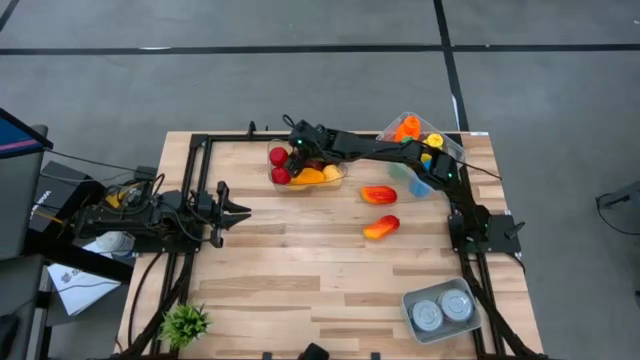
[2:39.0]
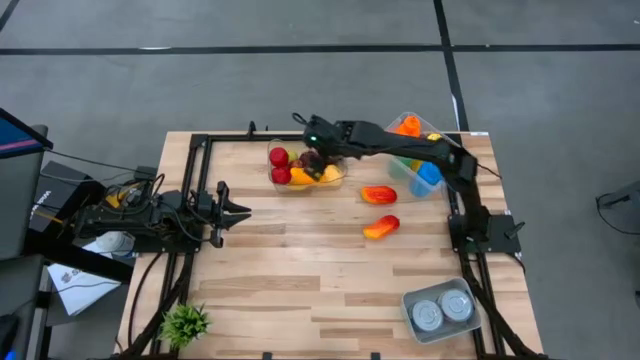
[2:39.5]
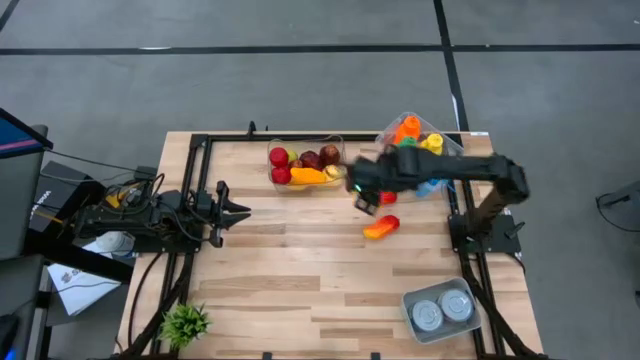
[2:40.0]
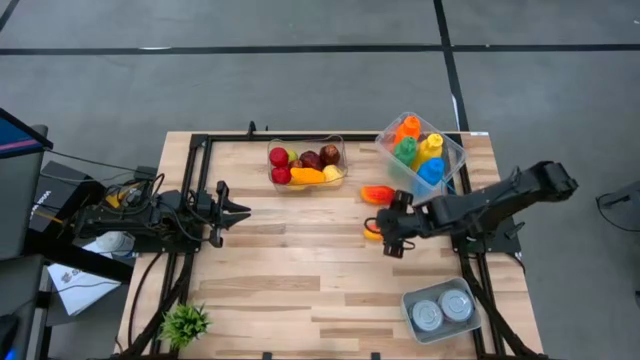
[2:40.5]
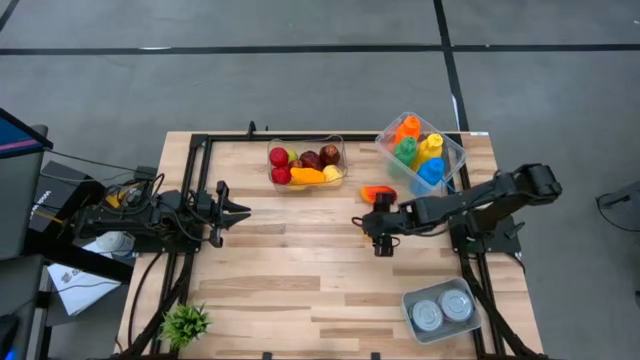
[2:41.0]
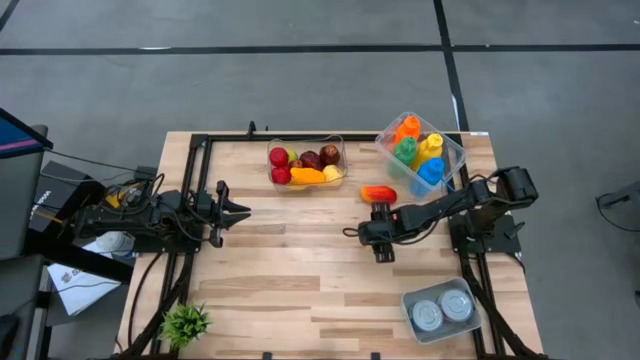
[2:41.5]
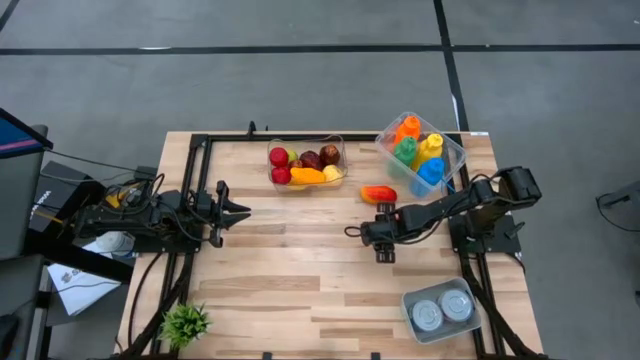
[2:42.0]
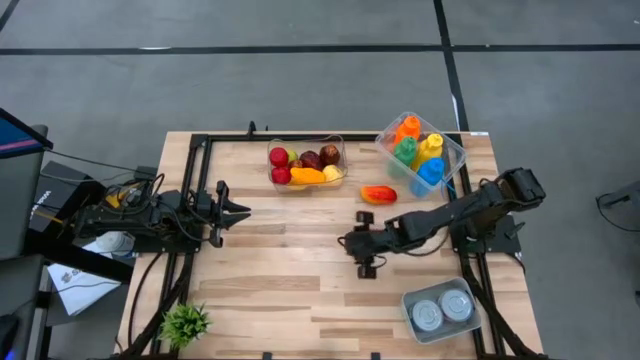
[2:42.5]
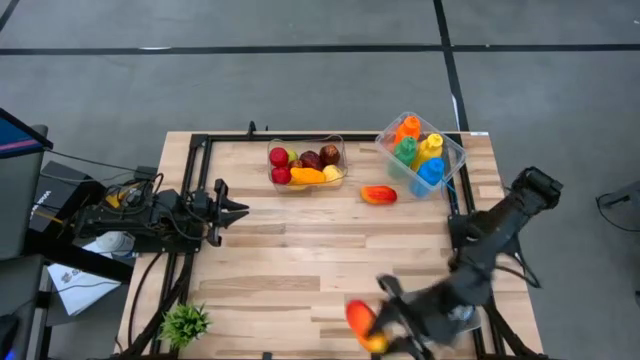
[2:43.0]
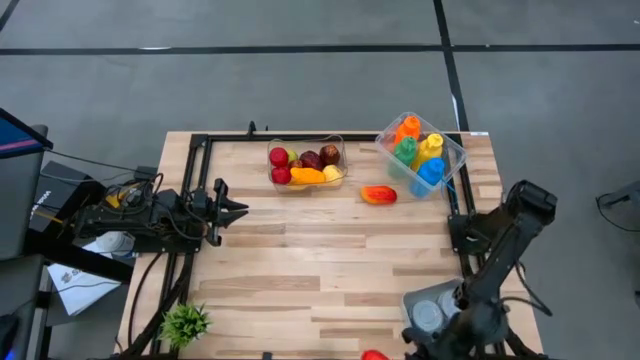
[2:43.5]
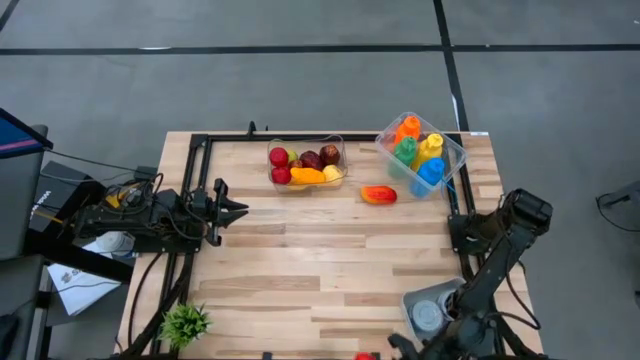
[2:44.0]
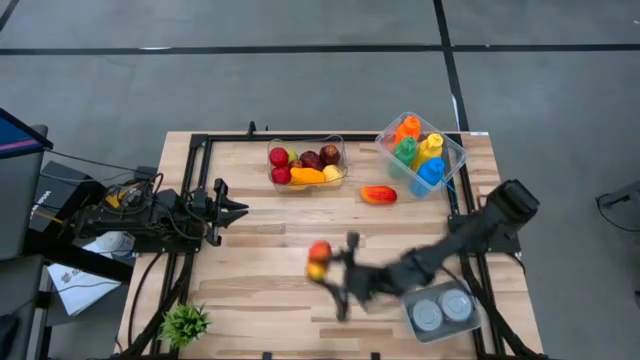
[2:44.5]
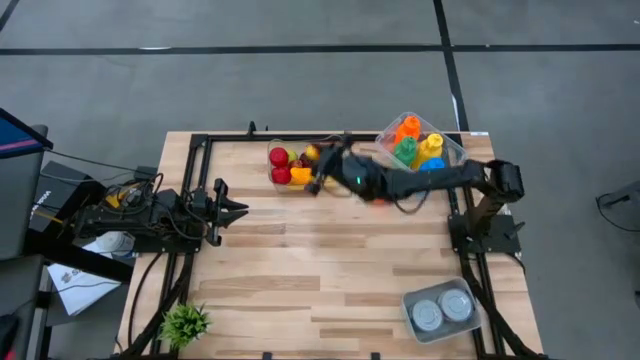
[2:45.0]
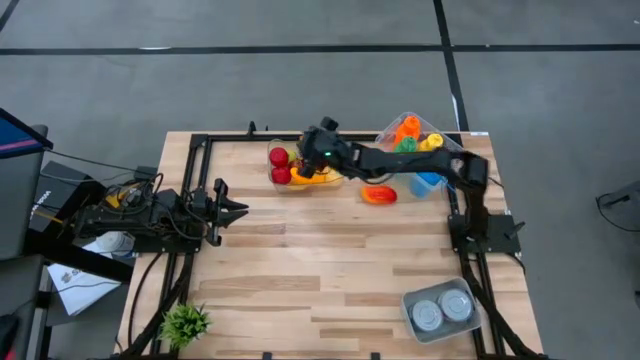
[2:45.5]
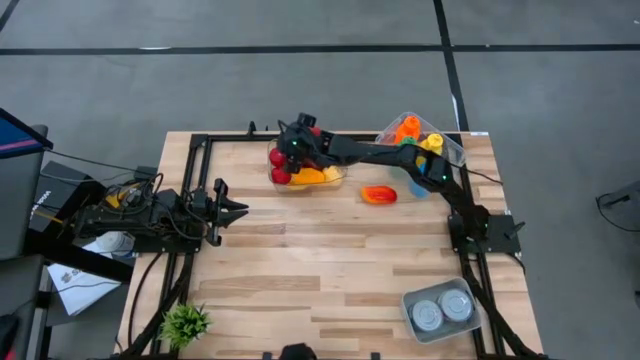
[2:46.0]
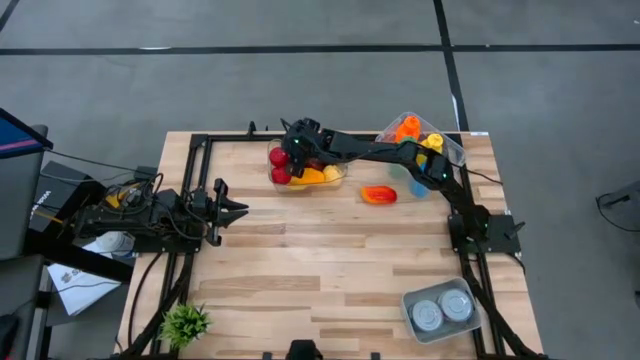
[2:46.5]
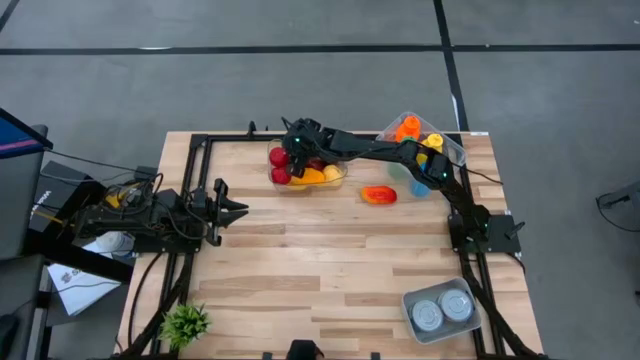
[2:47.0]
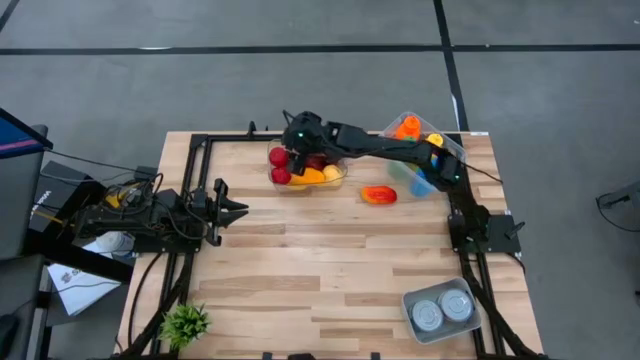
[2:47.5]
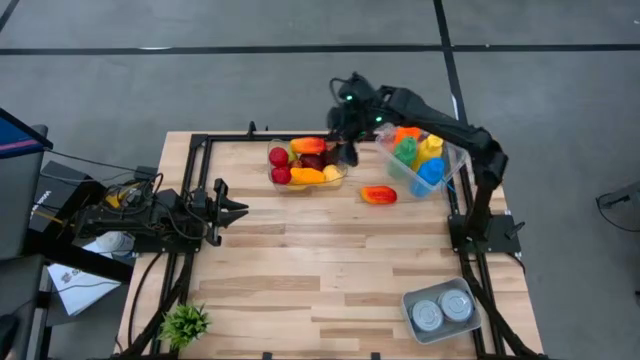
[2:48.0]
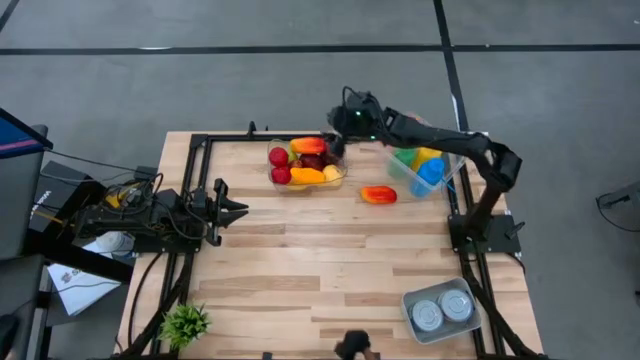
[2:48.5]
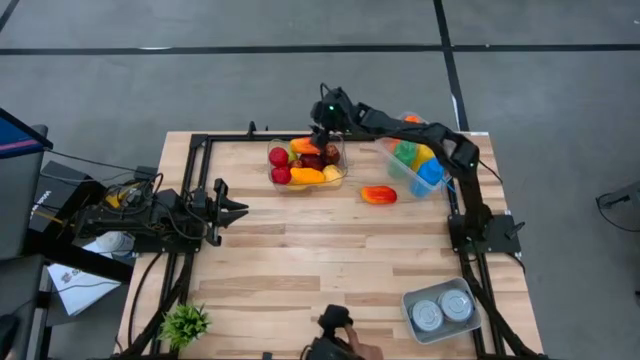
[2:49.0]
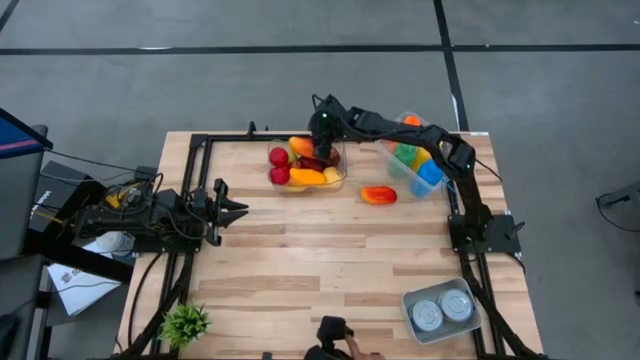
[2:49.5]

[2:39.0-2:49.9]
Task: Pick & Place Food Item
Put the bottom red mango into the transparent bin

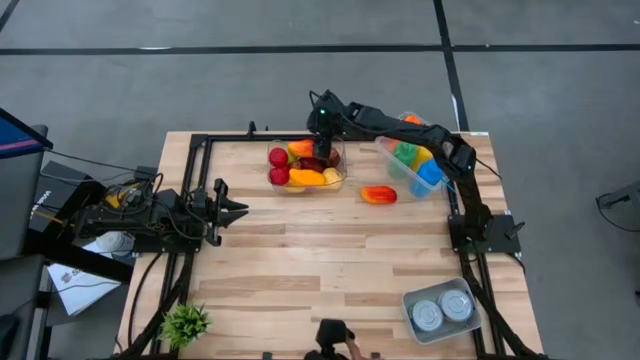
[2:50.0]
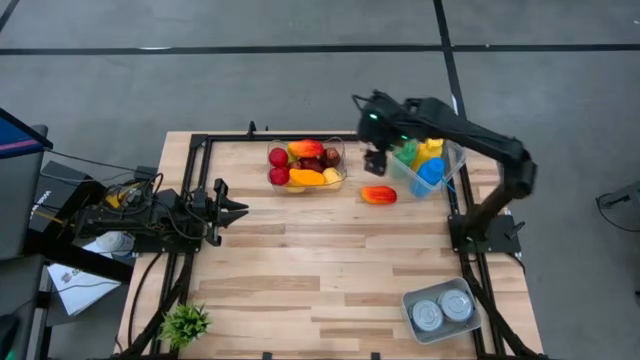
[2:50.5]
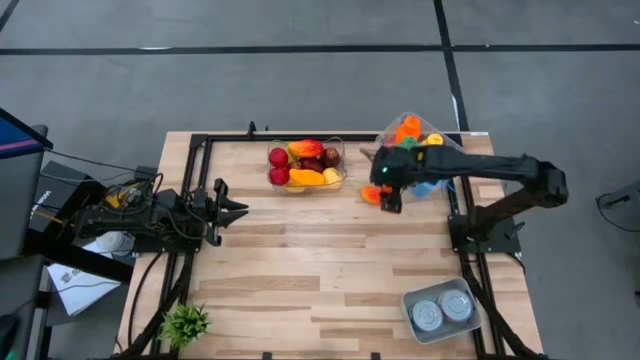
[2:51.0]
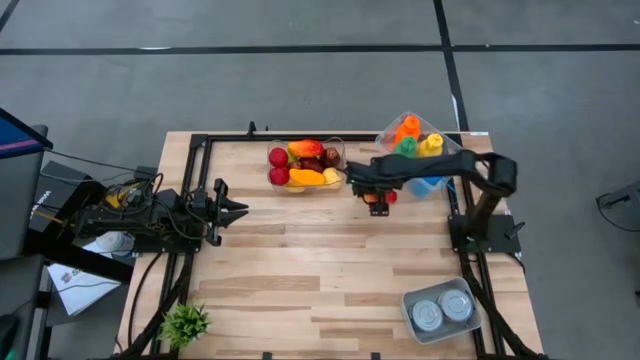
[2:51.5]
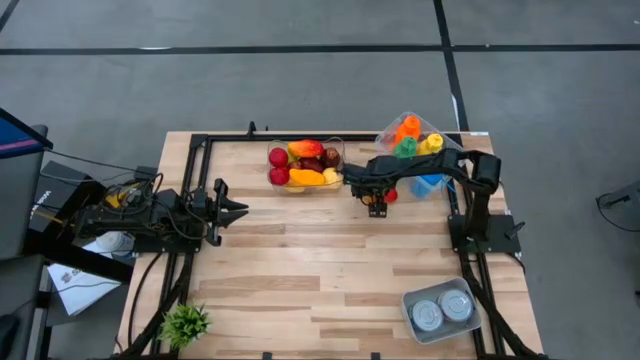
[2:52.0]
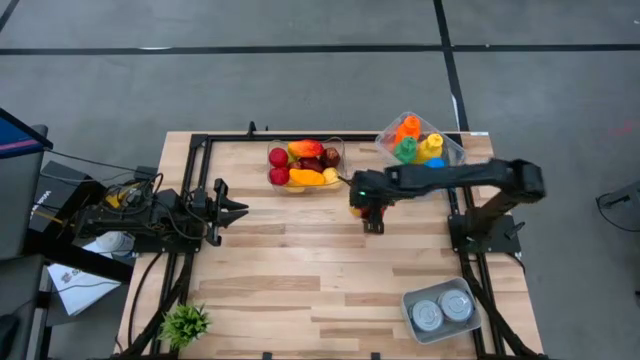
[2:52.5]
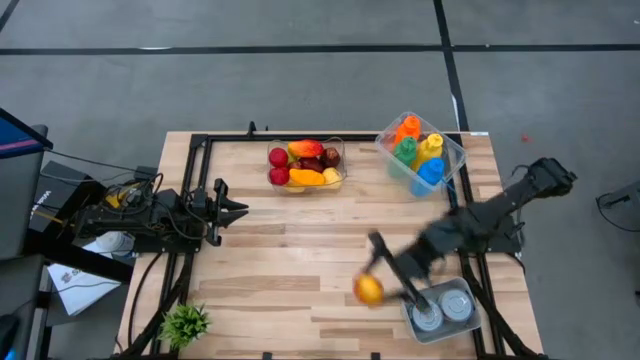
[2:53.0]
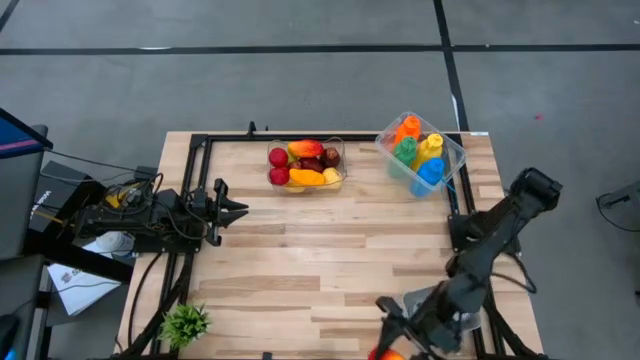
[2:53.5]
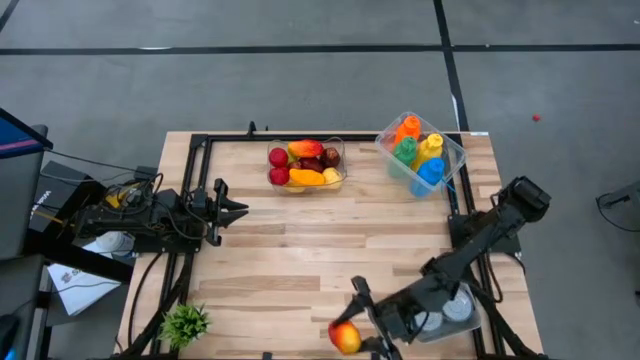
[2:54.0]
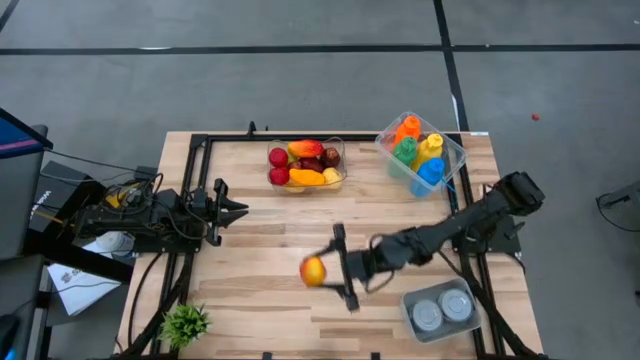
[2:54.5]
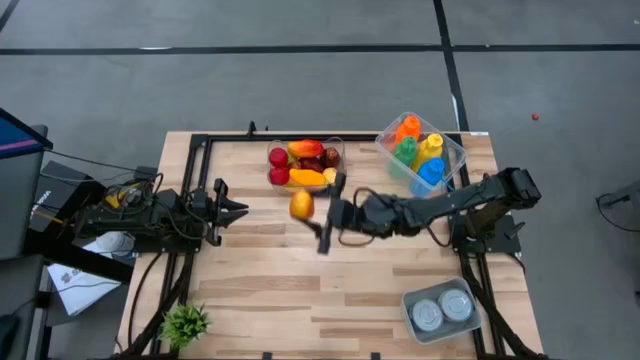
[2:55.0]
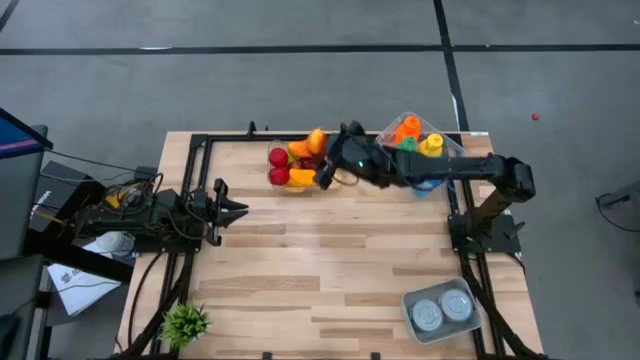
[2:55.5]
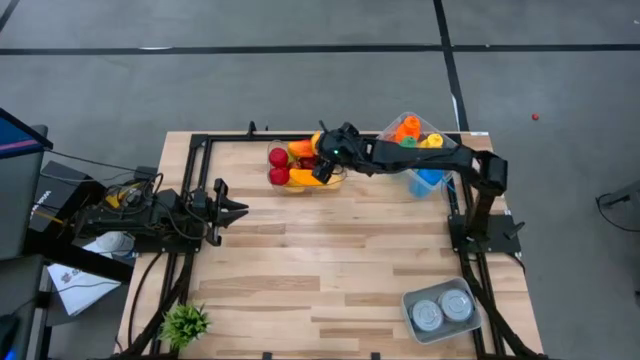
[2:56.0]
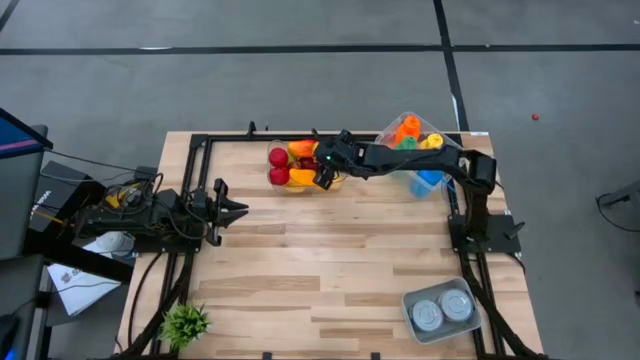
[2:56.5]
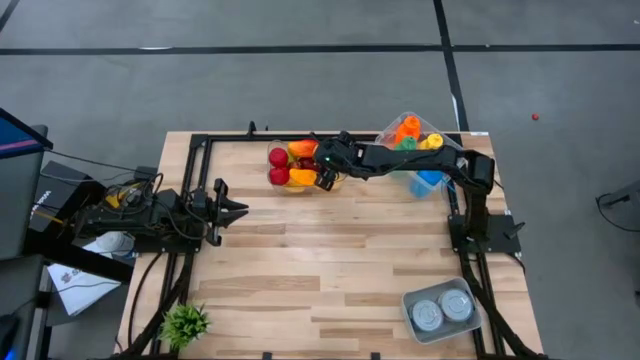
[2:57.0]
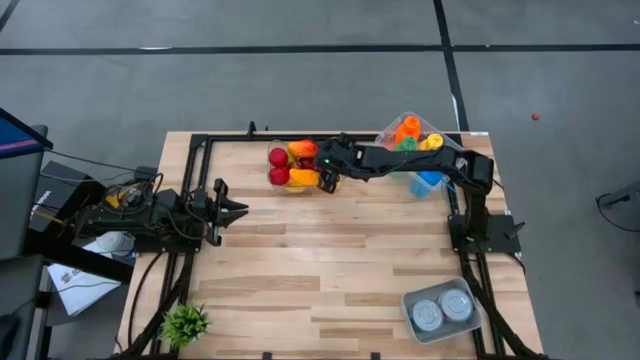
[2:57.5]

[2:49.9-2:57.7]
Put the red mango into the transparent bin

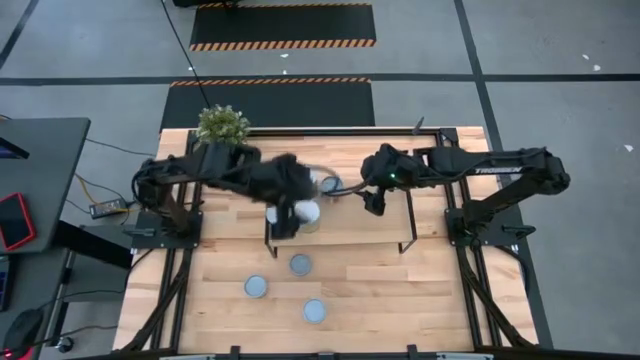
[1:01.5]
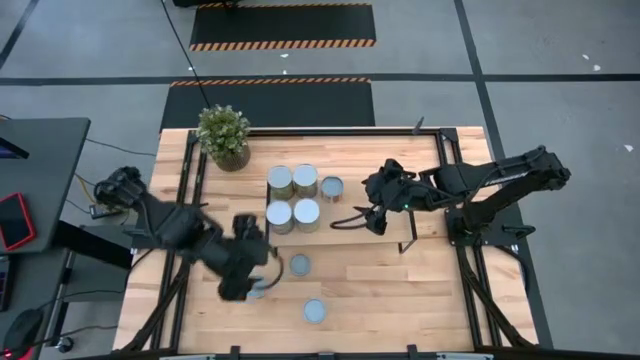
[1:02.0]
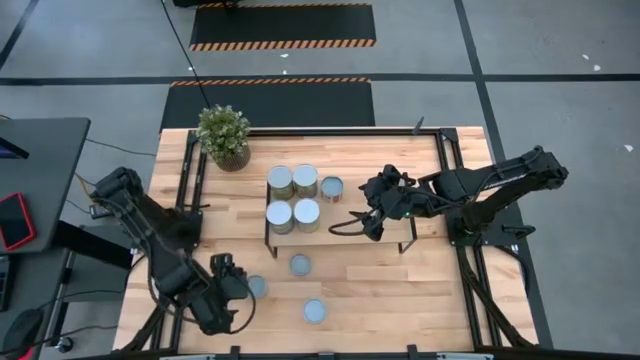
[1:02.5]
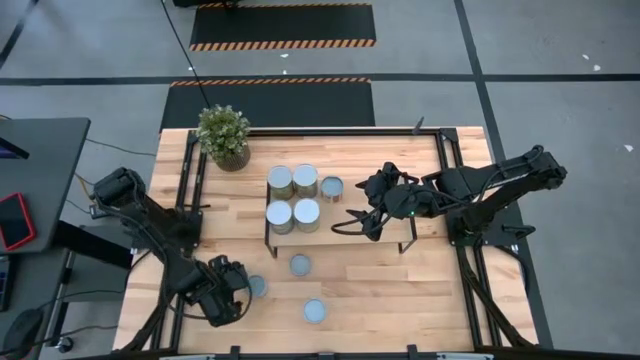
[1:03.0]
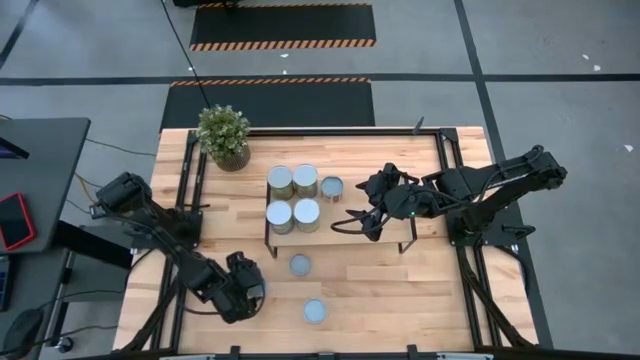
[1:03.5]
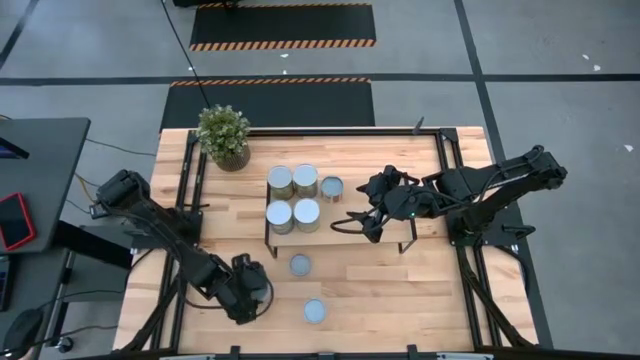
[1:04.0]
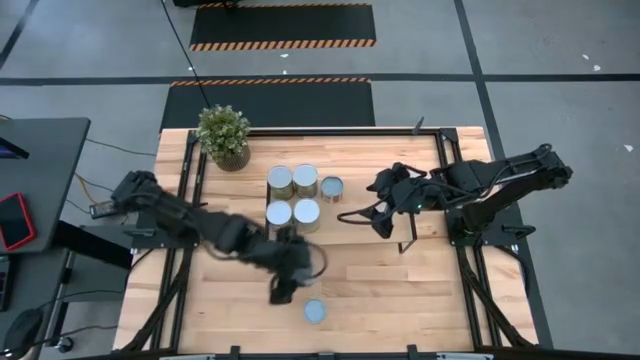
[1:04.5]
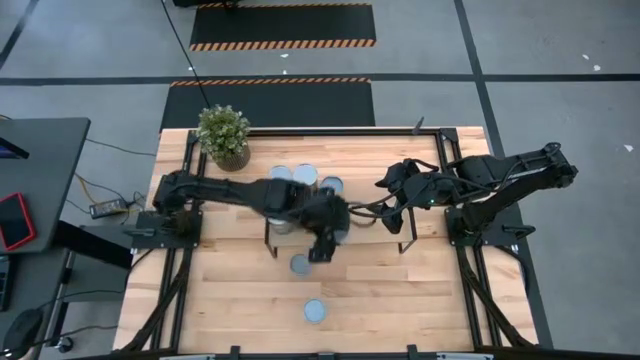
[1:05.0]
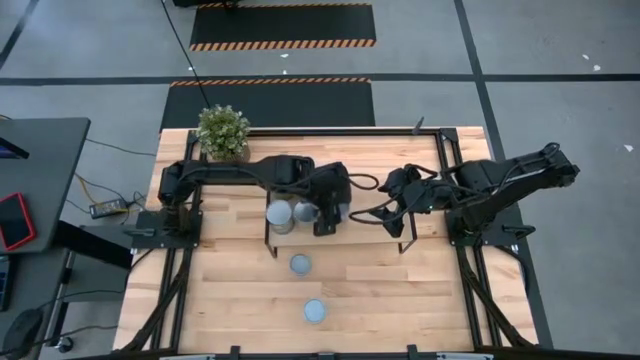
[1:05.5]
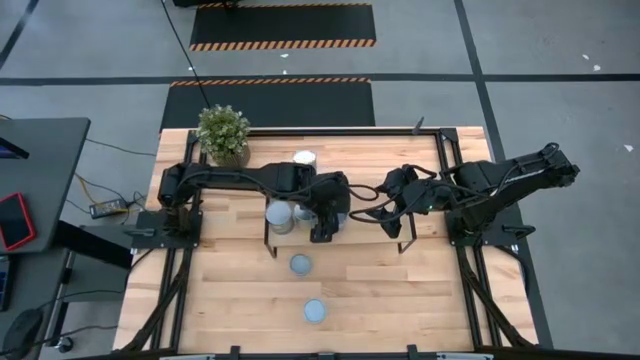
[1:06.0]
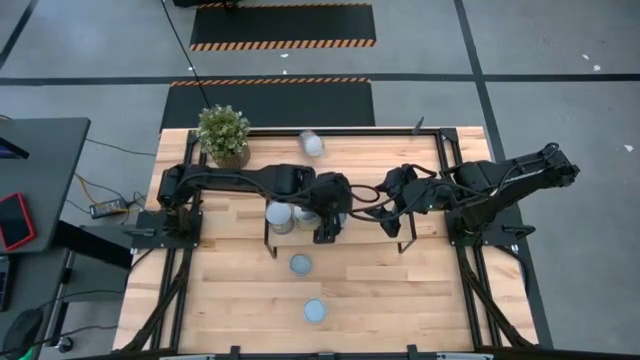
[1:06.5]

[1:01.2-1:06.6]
Task: Pick and place cans onto a shelf
Put the canned green peas on the shelf
